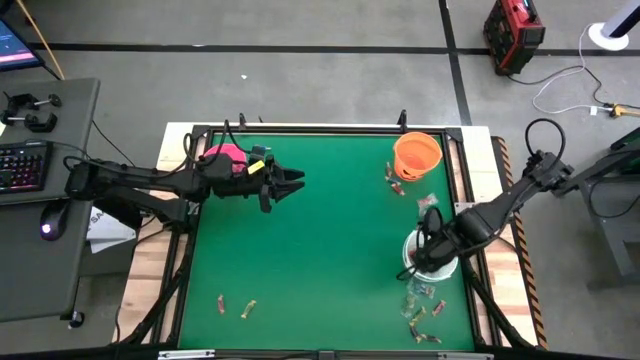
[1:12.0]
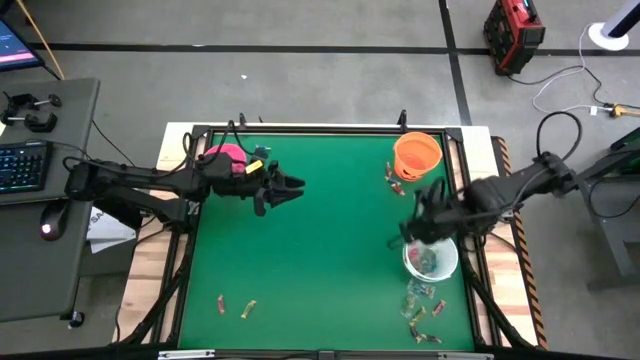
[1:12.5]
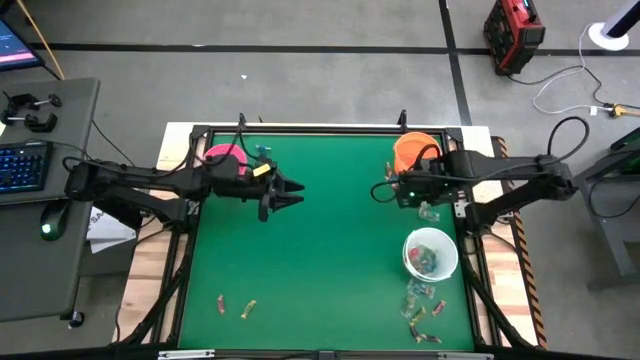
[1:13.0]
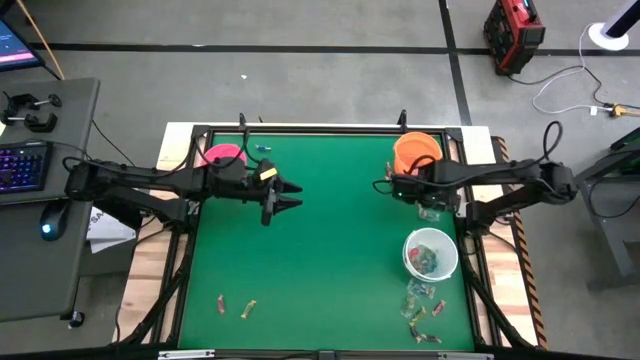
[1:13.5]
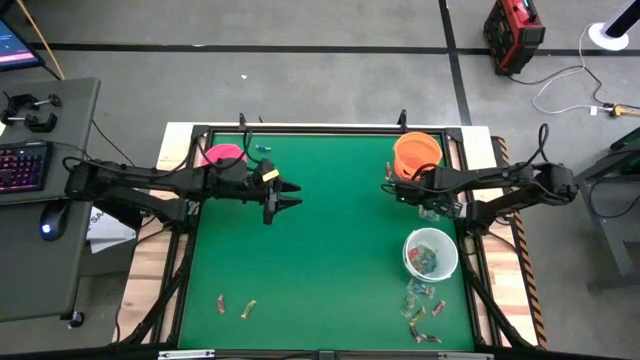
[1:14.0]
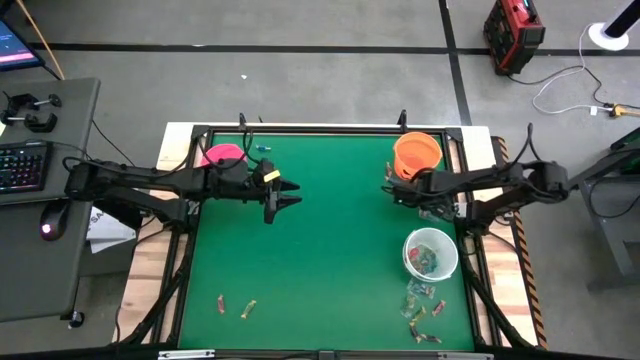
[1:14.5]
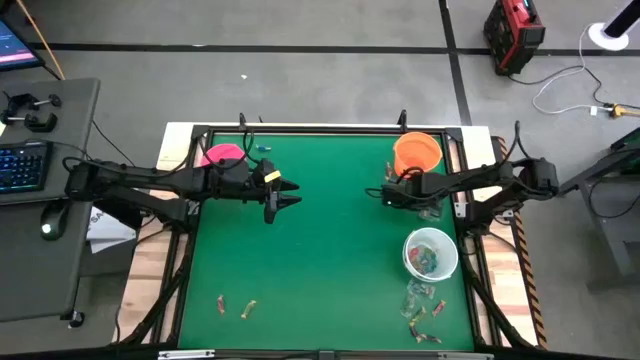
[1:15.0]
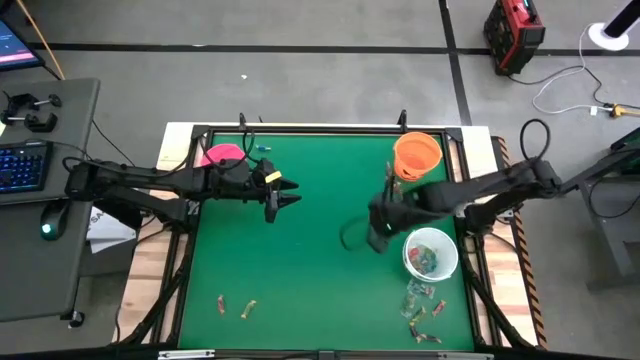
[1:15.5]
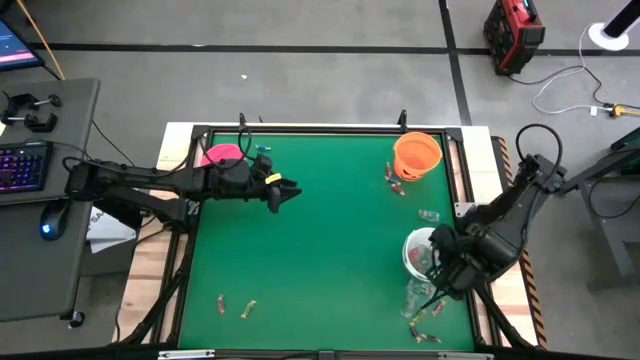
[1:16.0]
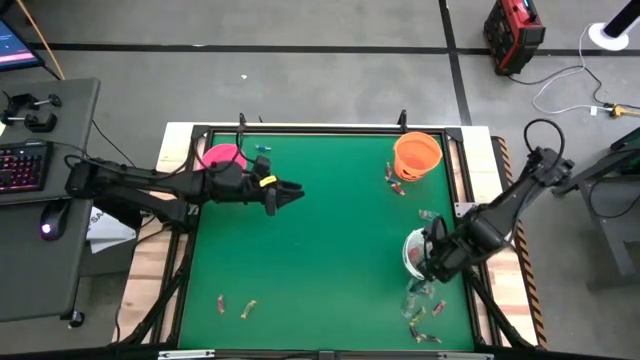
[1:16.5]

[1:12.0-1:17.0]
Task: Sort candy by brand, put in halloween buckets
Put the orange gummy into the white bucket

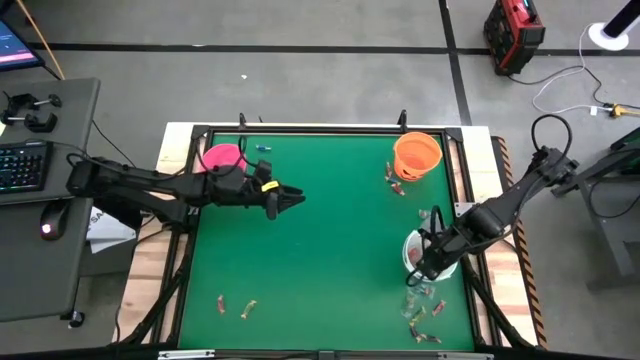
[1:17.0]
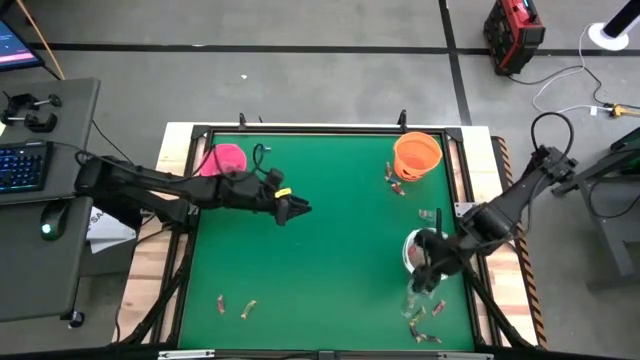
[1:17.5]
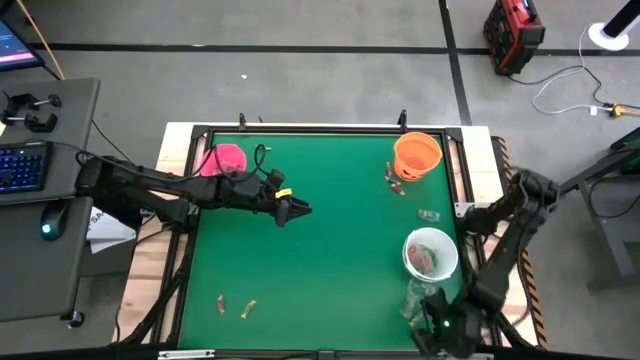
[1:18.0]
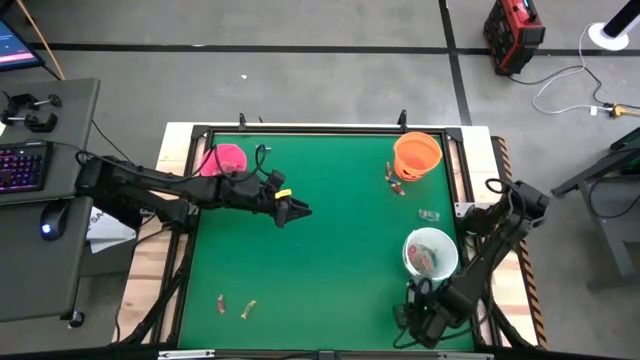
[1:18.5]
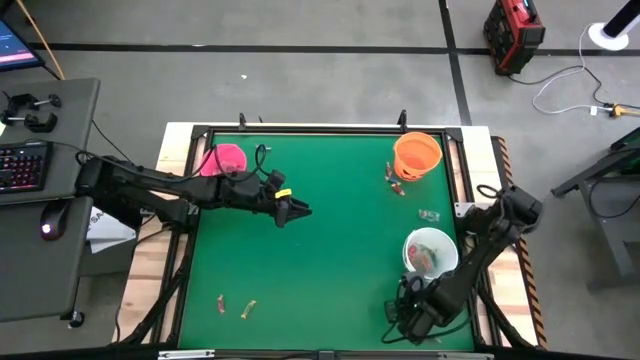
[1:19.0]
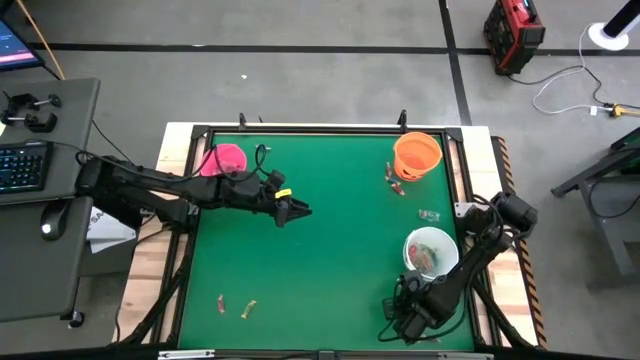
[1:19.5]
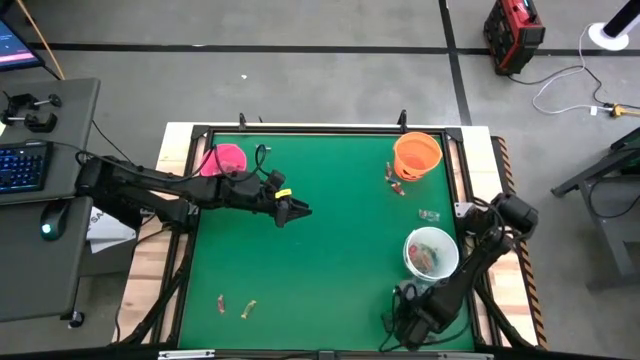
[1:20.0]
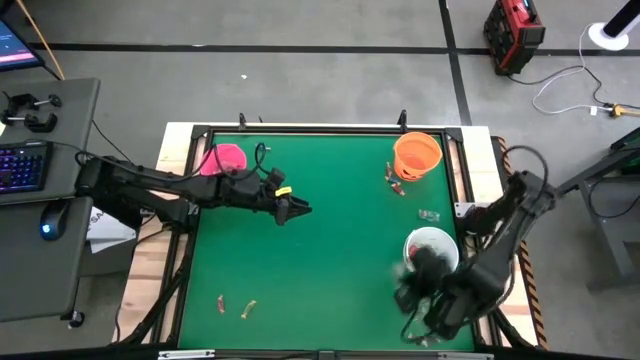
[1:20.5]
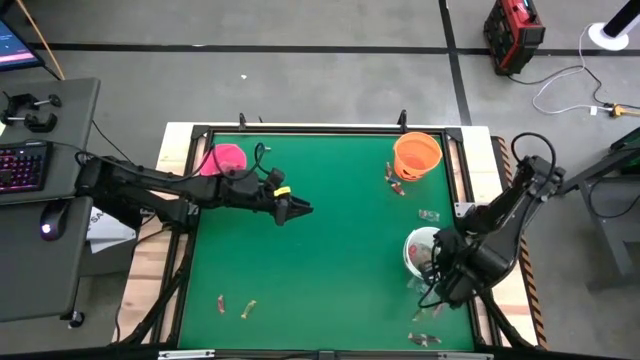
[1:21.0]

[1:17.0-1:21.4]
Put the green gummy into the white bucket

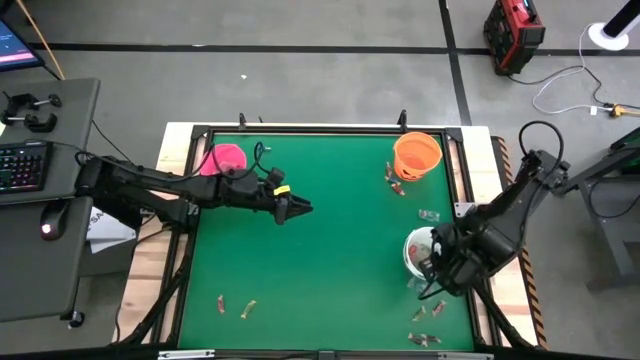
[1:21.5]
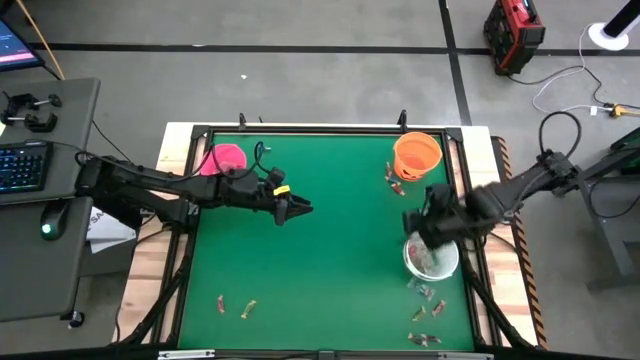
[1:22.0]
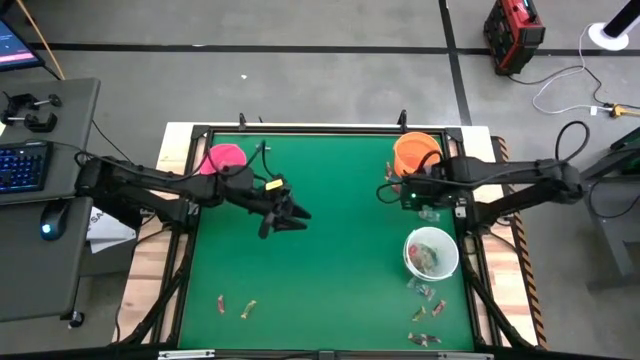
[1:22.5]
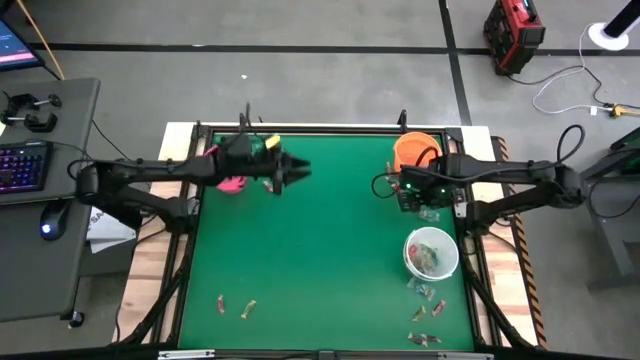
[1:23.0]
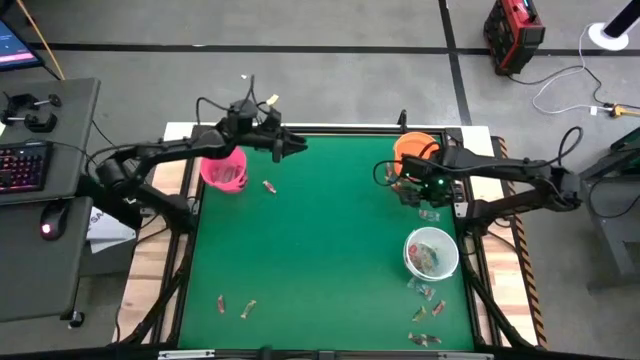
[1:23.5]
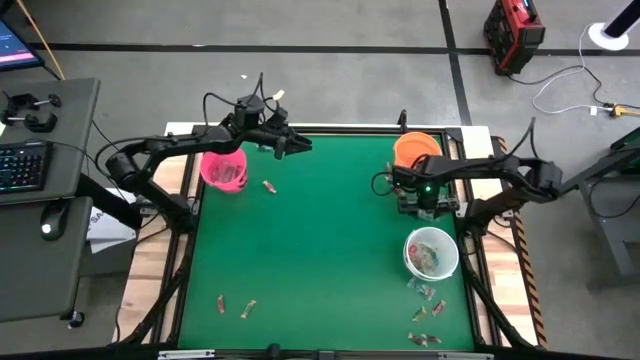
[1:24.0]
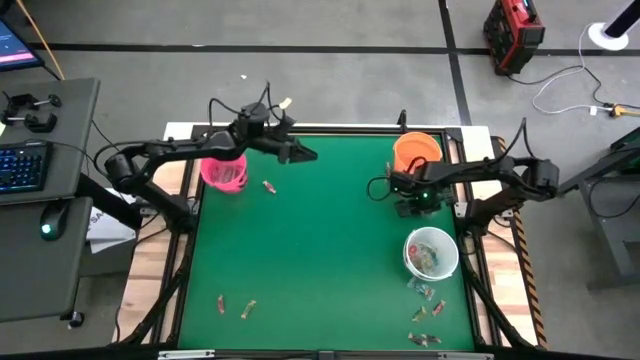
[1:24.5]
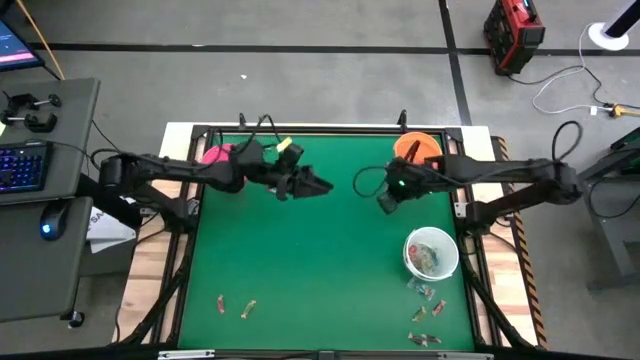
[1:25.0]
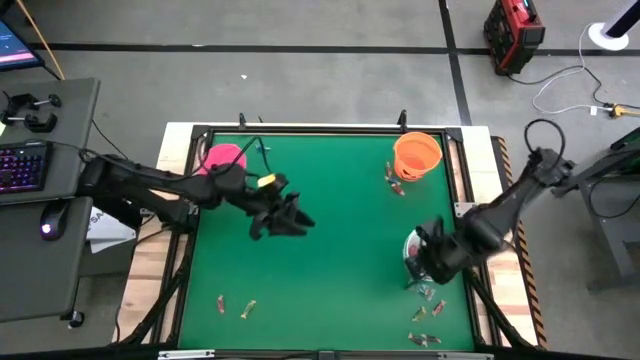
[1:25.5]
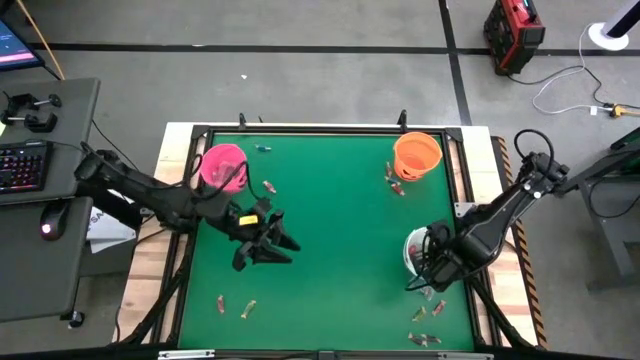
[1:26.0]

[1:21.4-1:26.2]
Put the blue gummy into the white bucket

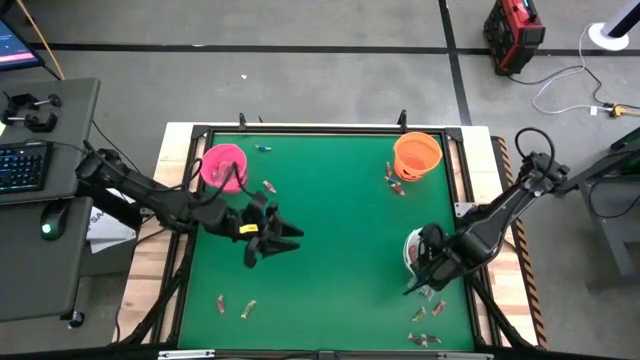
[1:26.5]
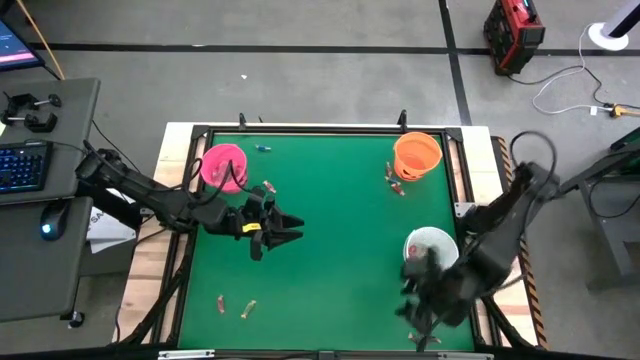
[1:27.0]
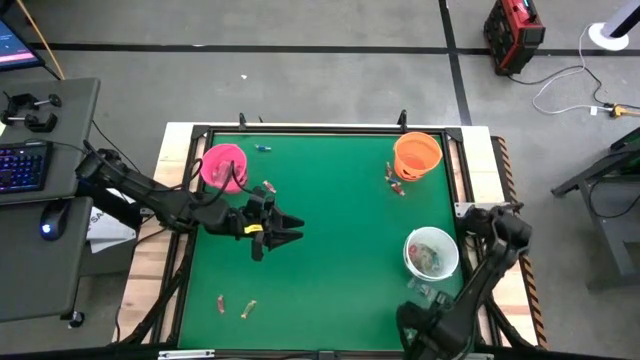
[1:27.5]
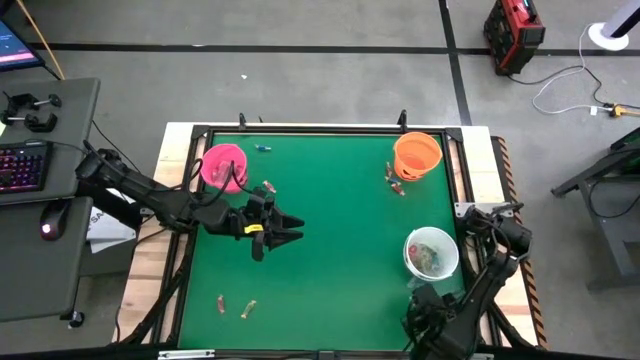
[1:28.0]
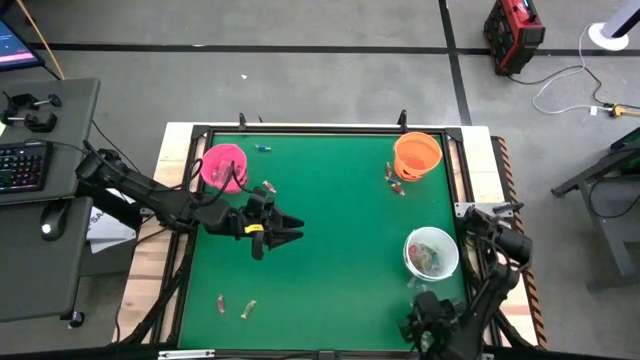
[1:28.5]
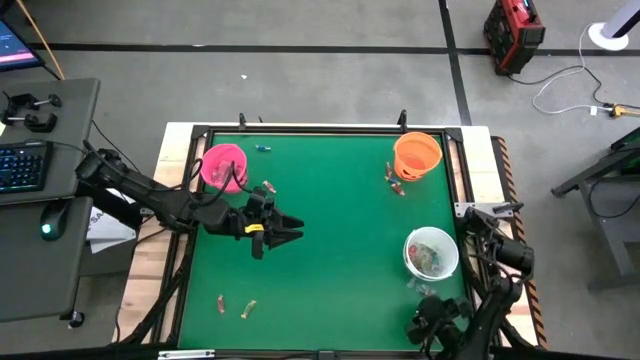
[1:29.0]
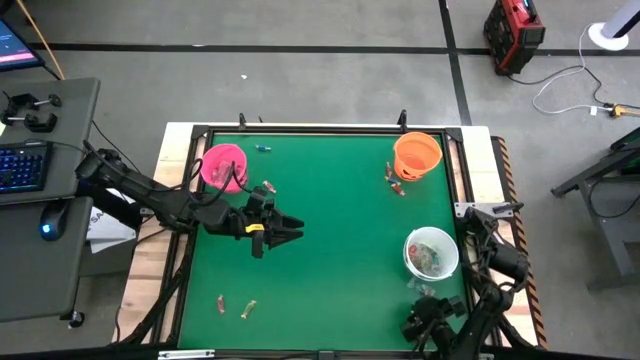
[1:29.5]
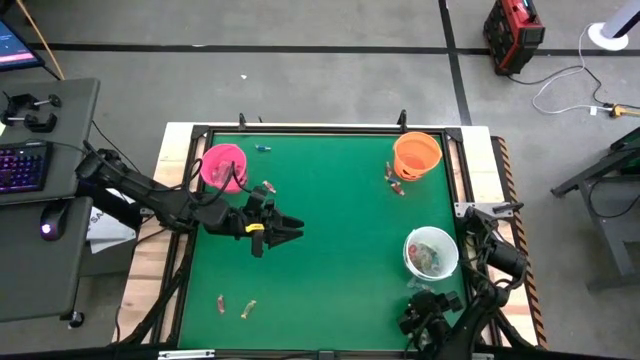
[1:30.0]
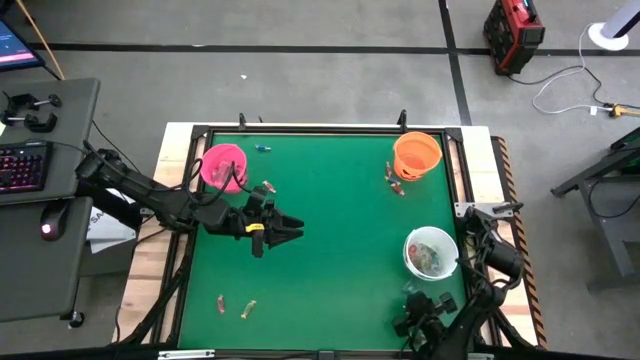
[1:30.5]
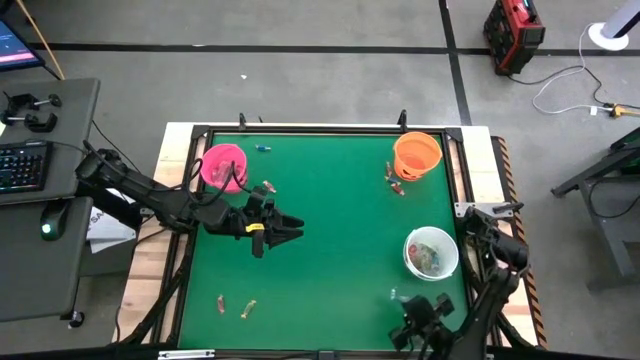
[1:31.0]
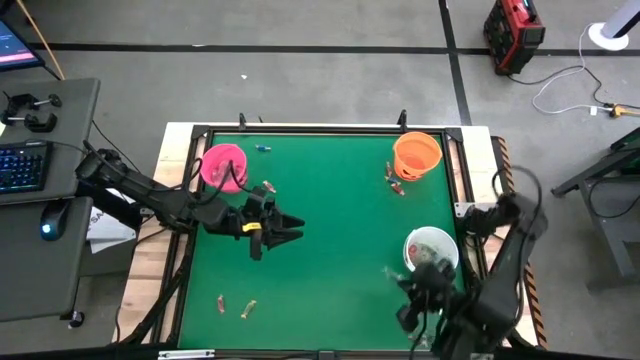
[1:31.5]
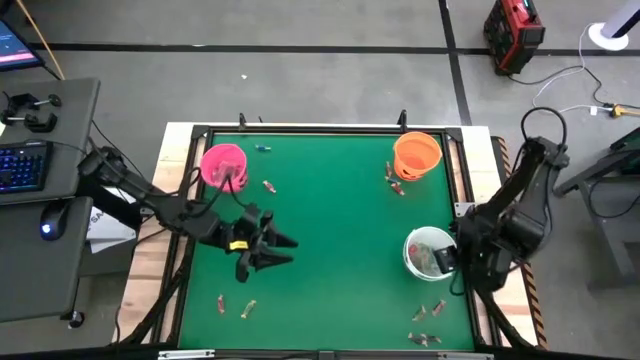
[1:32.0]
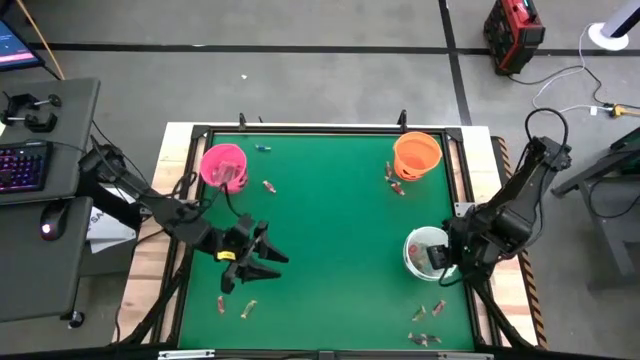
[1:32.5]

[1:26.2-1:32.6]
Put the blue gummy into the white bucket
